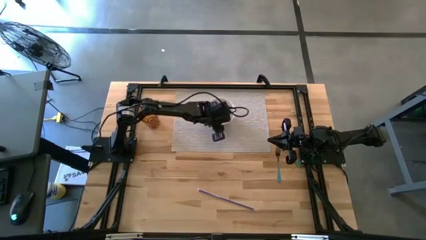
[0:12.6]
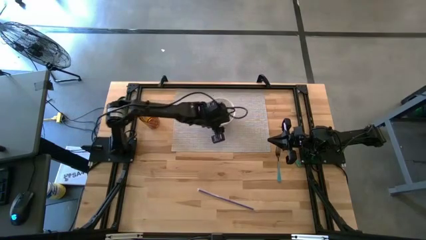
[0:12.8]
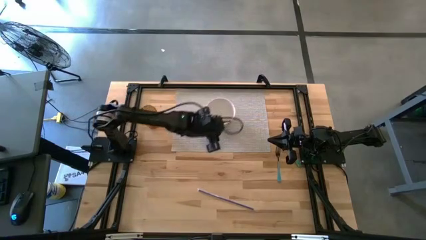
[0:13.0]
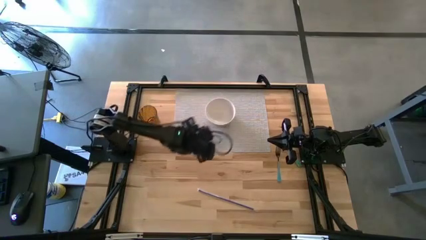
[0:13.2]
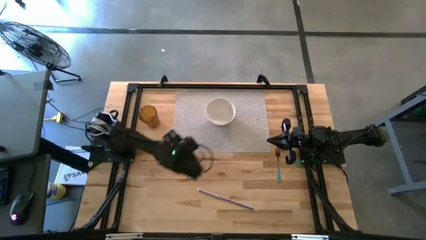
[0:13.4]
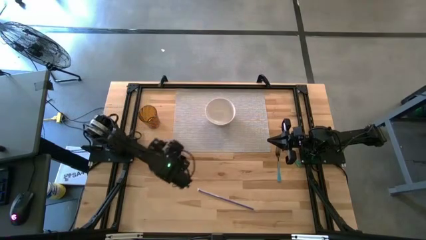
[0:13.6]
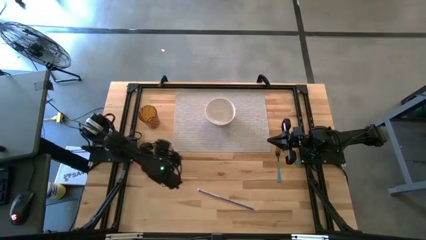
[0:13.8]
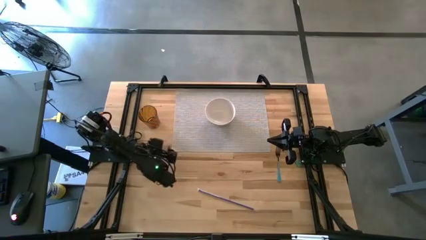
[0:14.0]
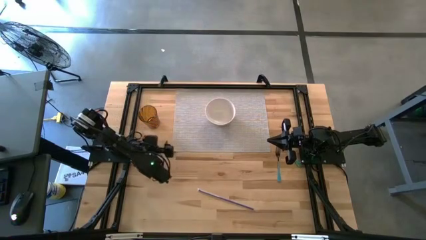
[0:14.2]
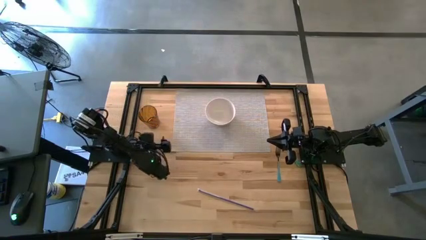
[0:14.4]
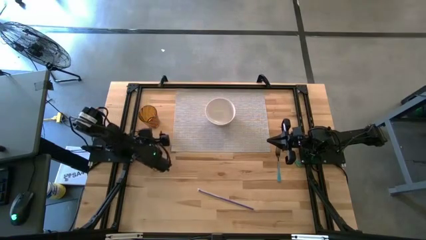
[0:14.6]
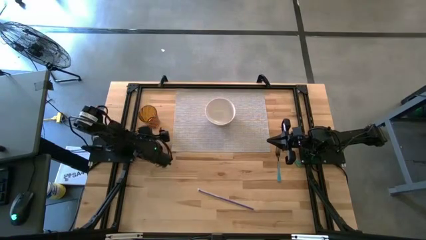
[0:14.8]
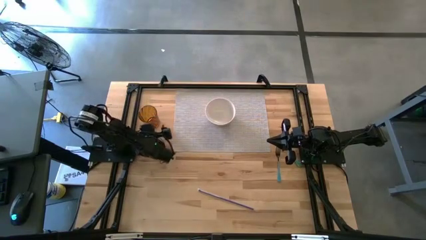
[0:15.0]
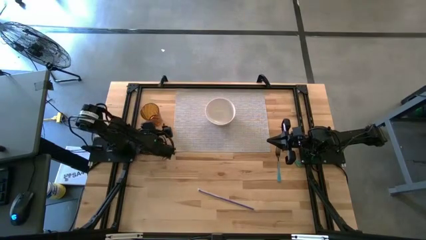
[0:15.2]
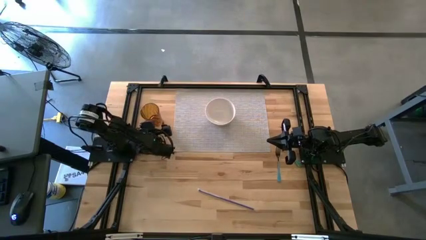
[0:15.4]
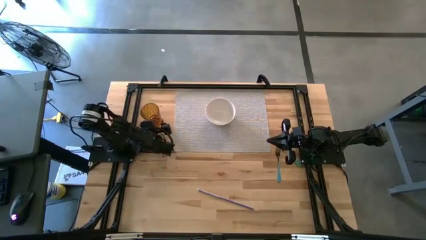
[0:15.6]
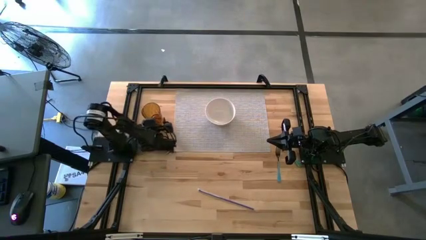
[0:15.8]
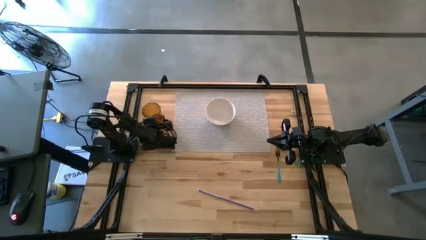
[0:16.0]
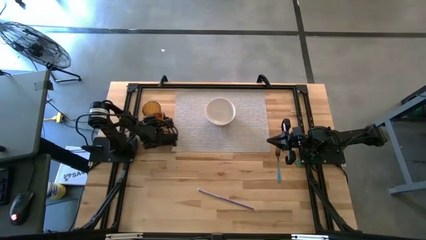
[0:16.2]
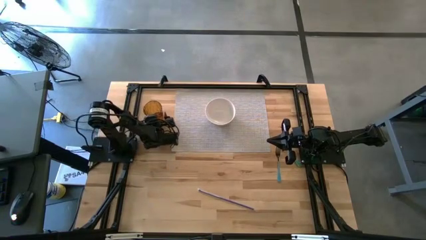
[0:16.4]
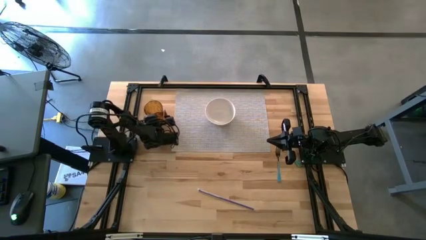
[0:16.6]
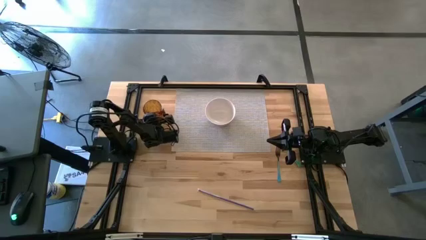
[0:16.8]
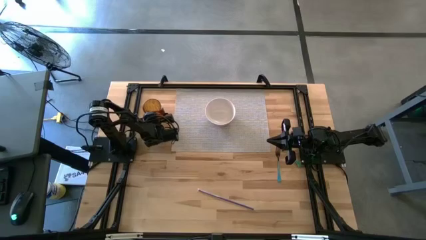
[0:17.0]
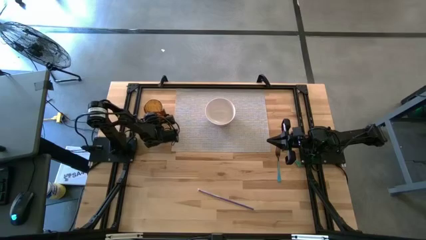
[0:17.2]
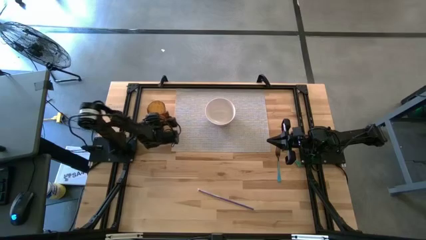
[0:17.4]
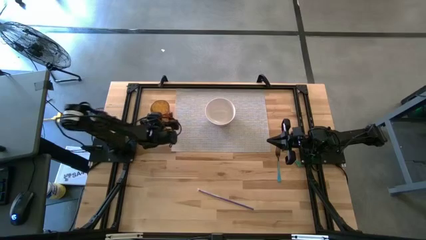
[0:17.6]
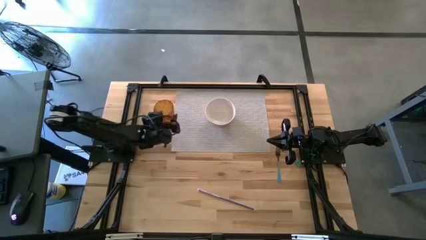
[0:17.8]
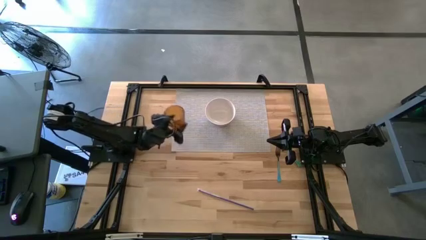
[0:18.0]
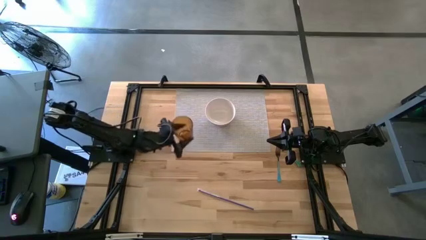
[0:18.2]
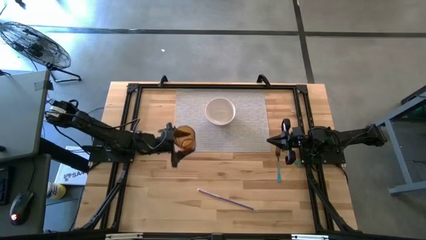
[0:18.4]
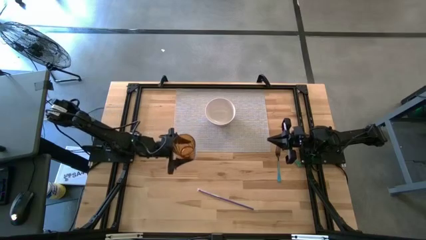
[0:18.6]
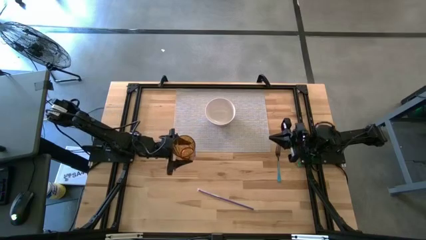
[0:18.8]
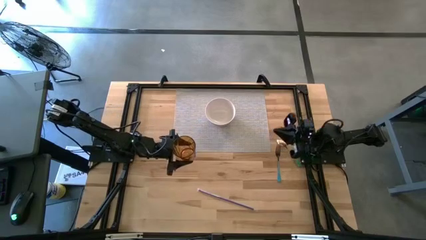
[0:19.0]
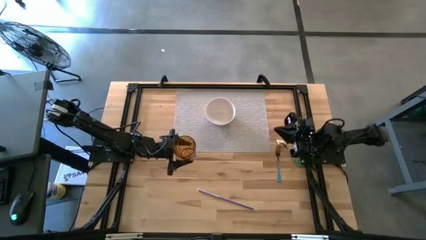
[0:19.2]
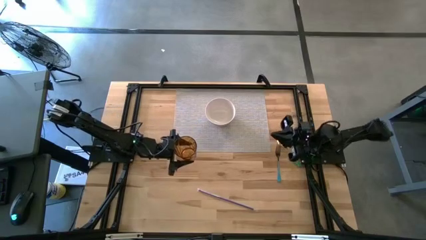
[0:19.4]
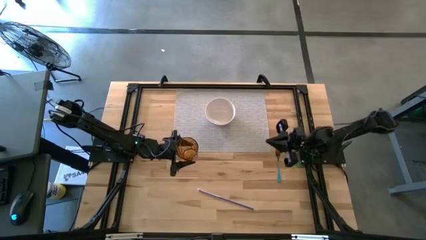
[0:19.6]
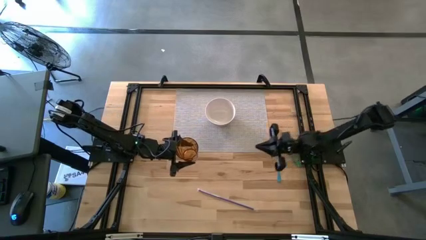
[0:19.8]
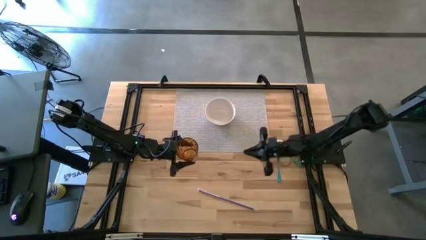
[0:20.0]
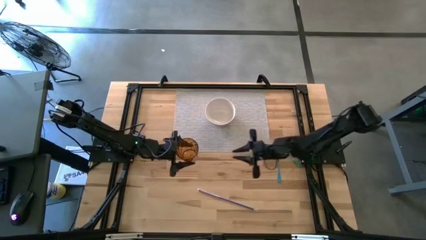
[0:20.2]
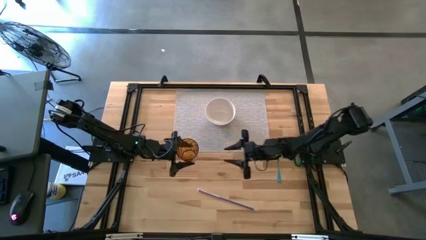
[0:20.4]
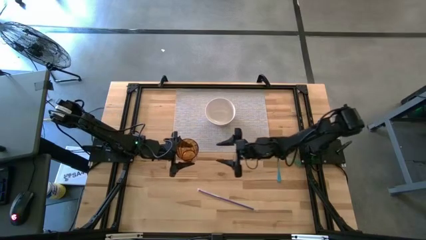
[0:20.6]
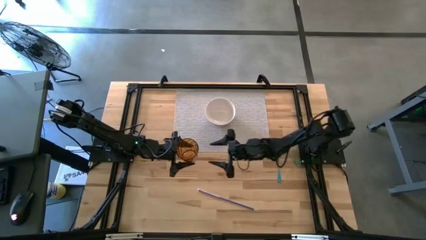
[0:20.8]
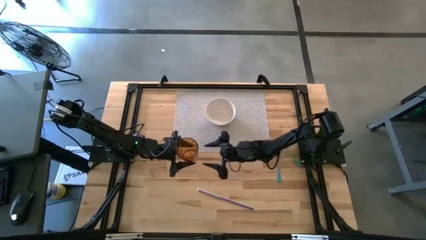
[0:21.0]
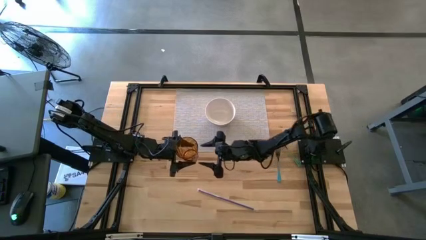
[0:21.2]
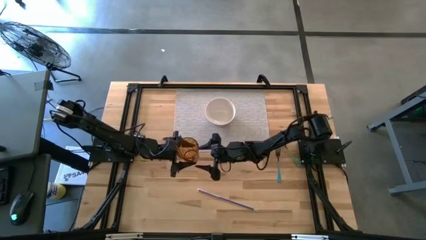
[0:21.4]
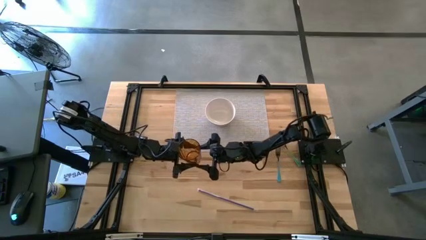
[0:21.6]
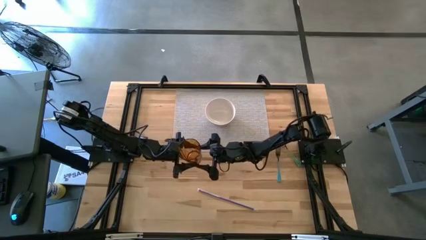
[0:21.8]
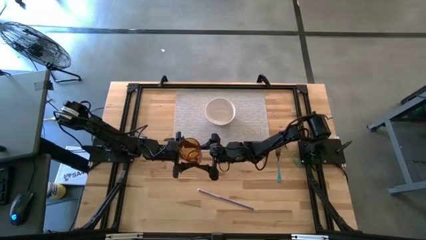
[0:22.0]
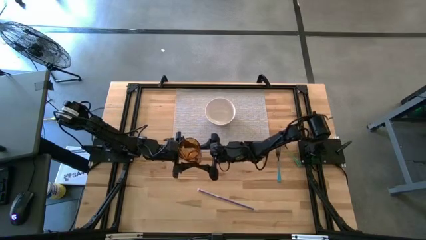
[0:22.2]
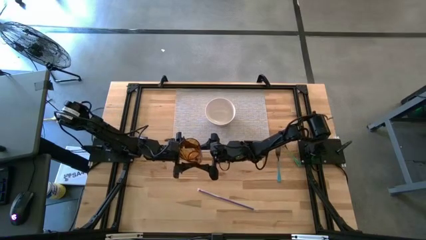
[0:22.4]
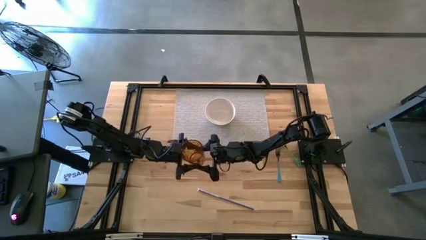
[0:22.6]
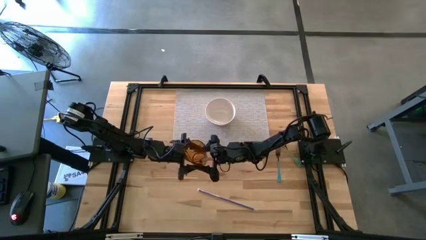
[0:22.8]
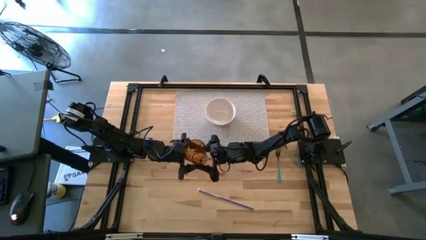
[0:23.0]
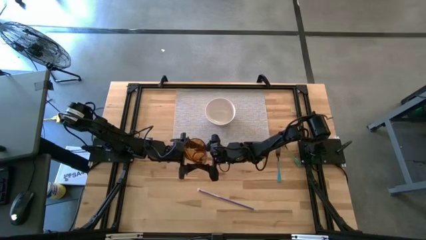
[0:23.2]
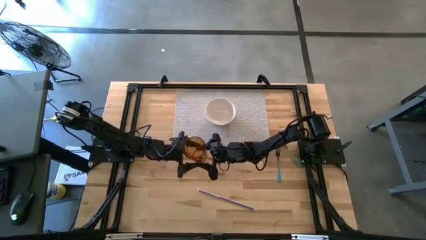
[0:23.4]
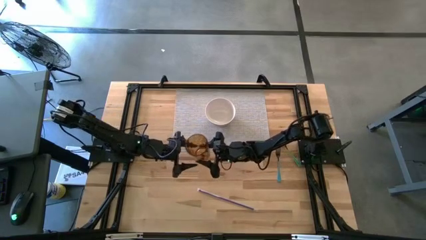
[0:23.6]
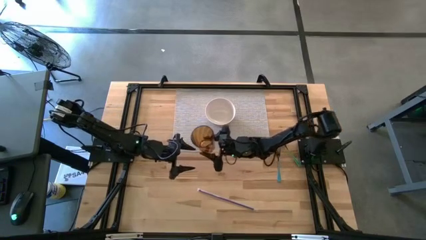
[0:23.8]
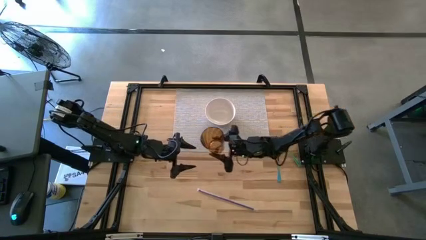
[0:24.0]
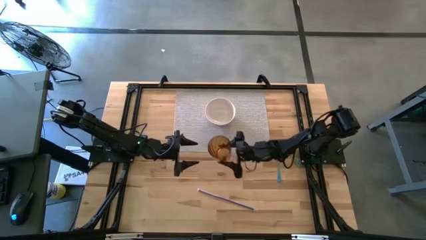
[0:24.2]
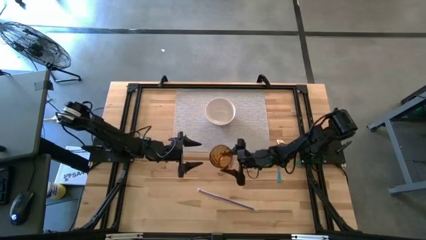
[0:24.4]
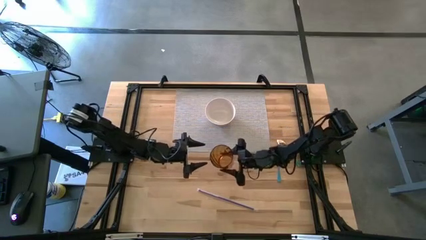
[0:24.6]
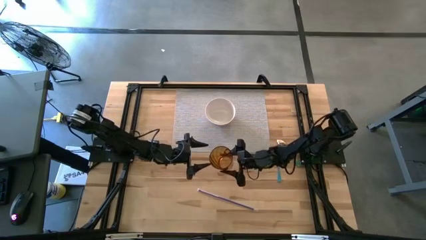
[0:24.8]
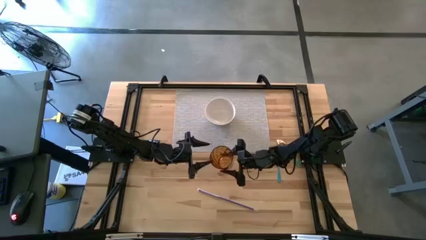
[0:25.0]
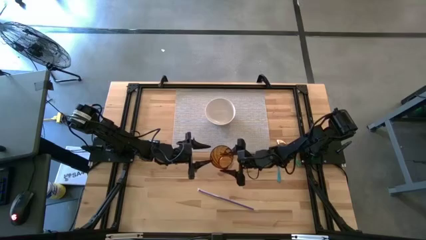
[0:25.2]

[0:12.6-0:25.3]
Task: Pick & Place Utensil
Put the brown cup on the gray mat to the top right of the white bowl

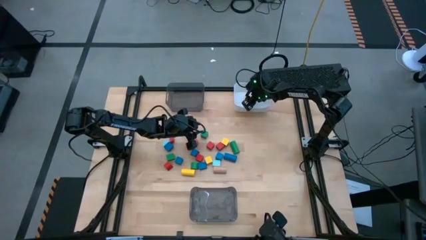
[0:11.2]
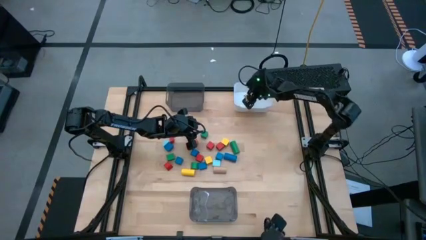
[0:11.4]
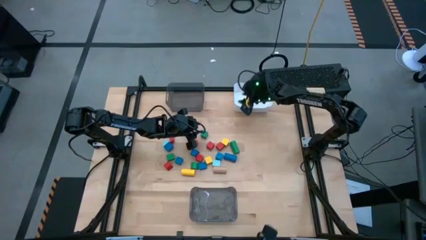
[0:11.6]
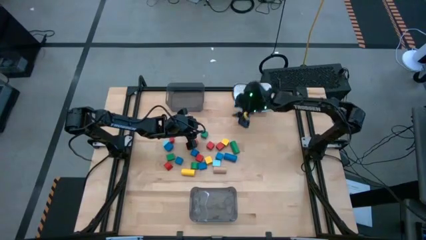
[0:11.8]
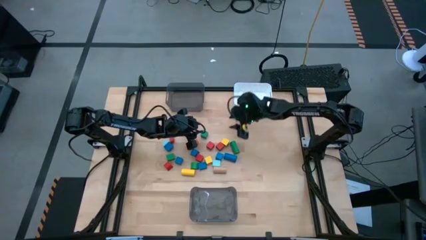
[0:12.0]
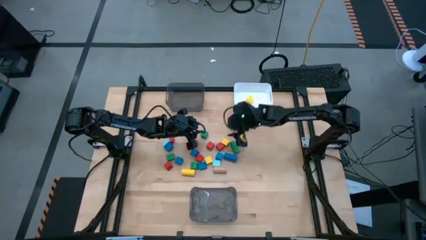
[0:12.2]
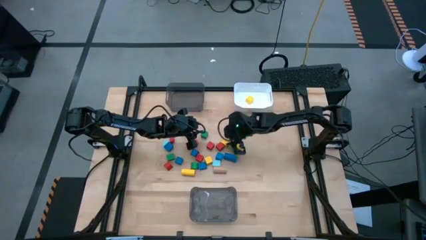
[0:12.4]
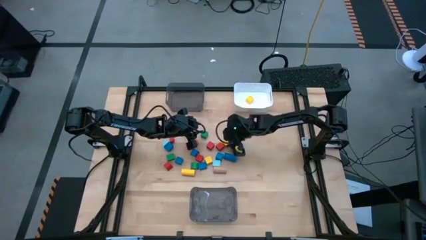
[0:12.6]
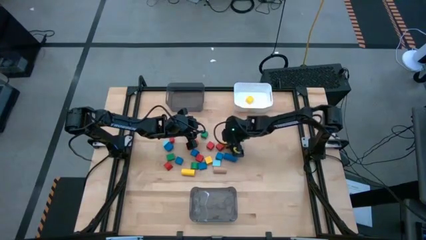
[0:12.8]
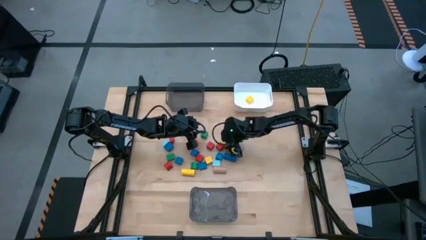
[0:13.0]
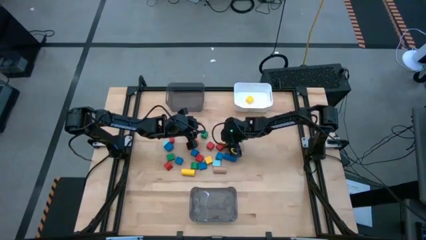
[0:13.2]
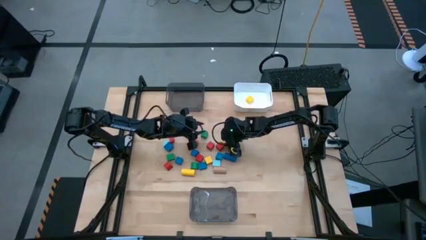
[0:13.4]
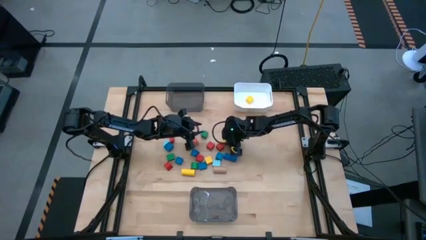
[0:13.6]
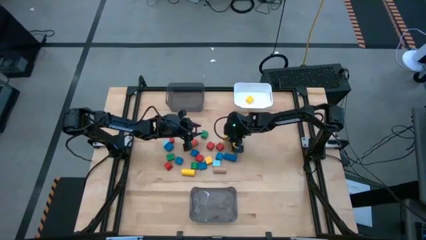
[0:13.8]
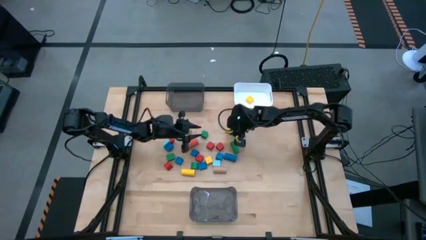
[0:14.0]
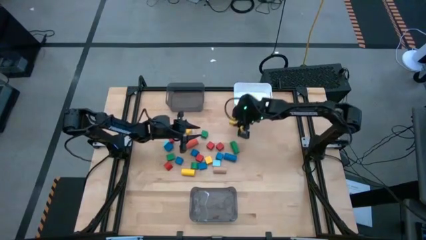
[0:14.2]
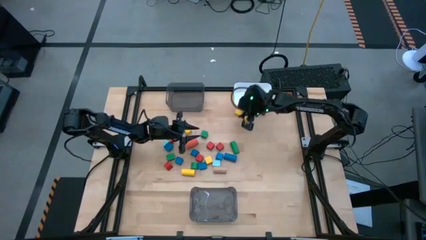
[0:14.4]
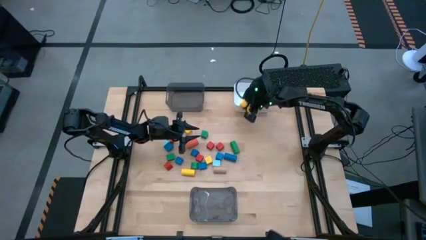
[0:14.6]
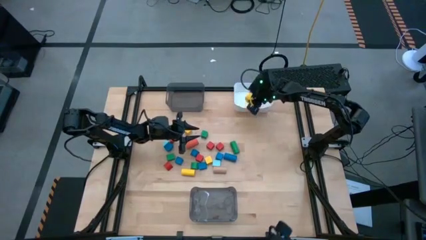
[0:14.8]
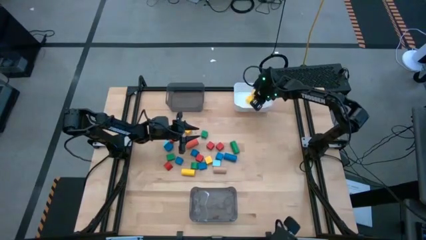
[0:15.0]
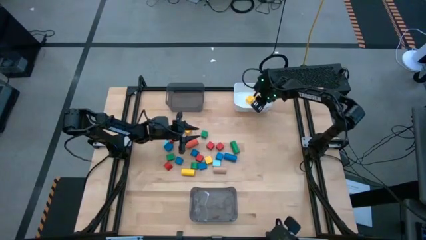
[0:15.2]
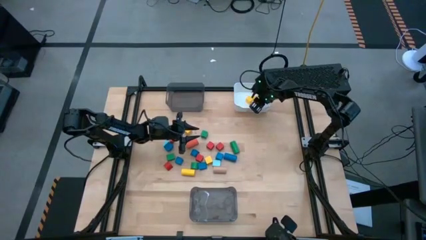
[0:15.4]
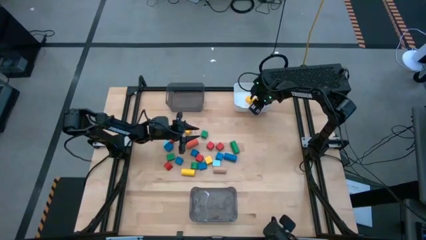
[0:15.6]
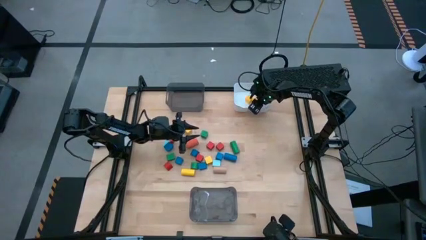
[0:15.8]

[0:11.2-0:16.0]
Task: Sort blocks by size
Put the yellow square block into the white bin
